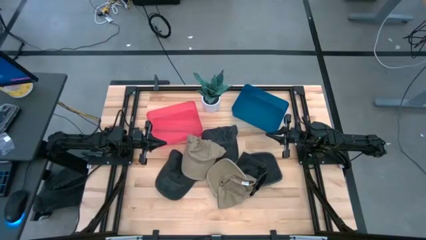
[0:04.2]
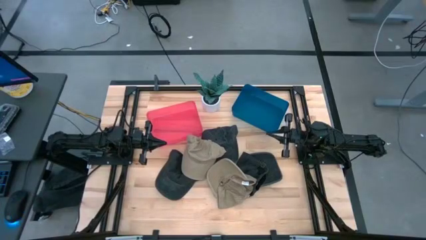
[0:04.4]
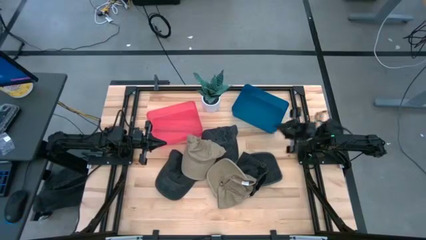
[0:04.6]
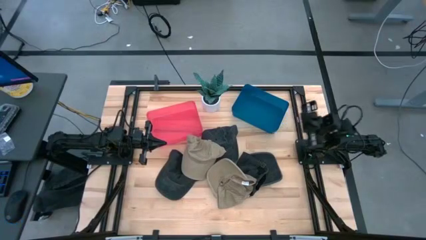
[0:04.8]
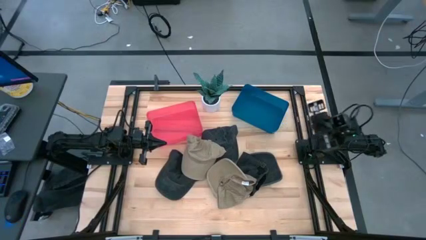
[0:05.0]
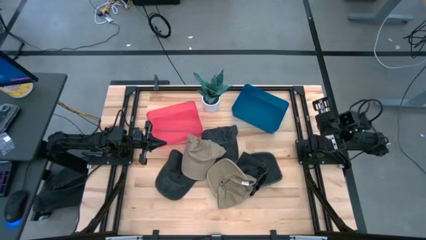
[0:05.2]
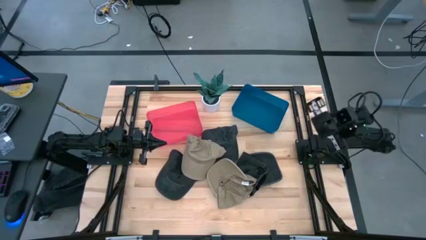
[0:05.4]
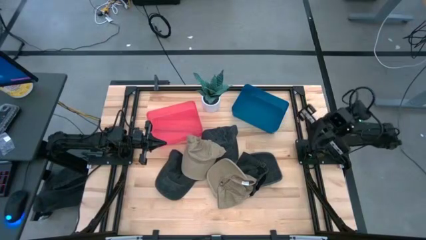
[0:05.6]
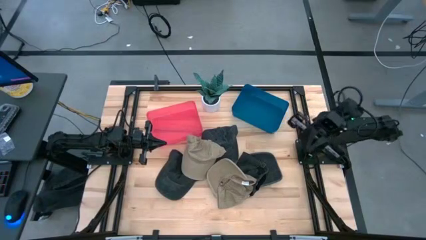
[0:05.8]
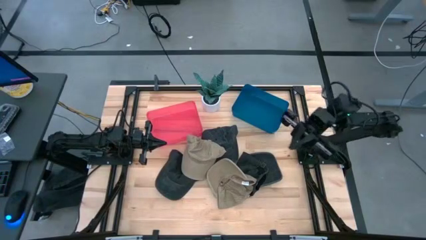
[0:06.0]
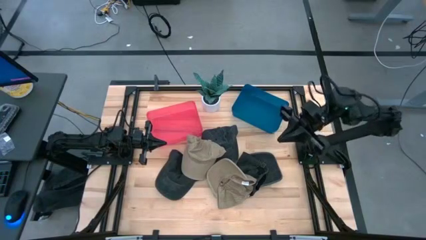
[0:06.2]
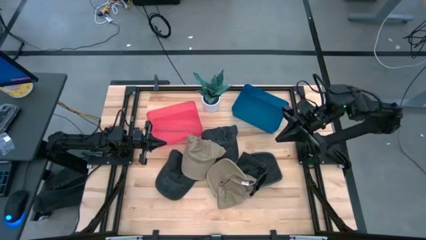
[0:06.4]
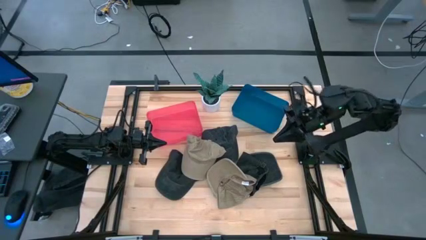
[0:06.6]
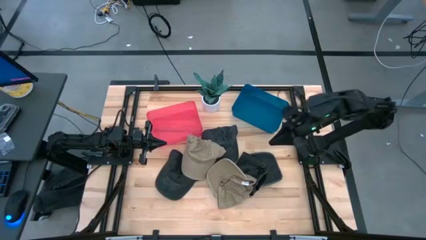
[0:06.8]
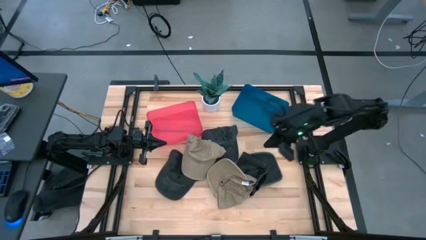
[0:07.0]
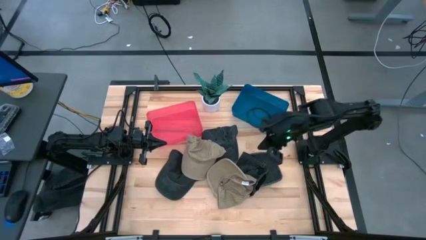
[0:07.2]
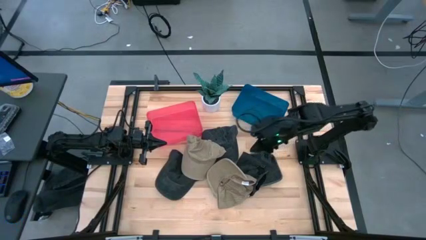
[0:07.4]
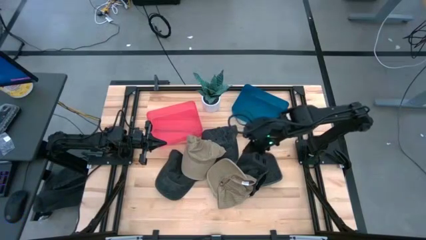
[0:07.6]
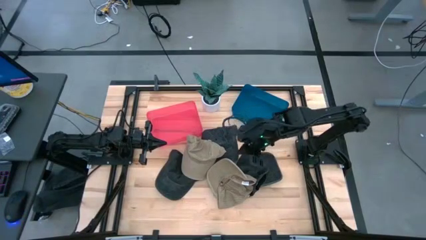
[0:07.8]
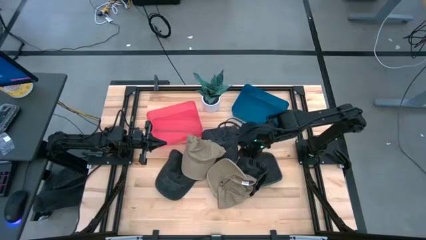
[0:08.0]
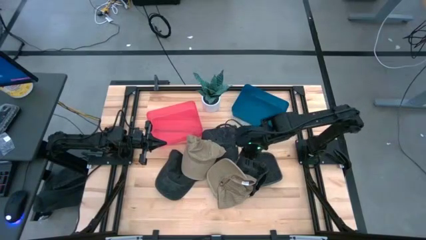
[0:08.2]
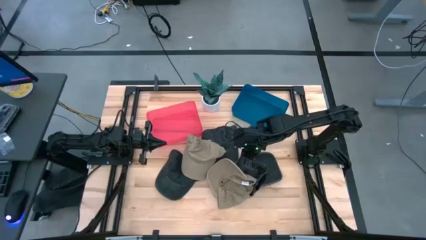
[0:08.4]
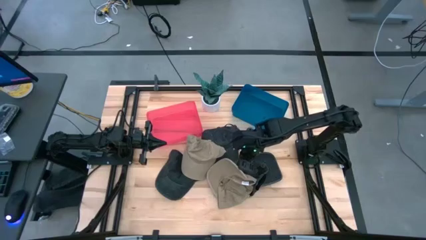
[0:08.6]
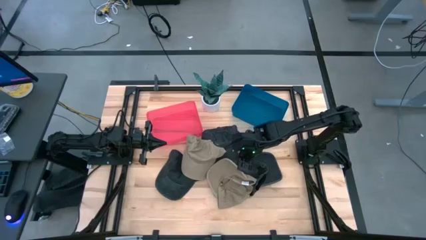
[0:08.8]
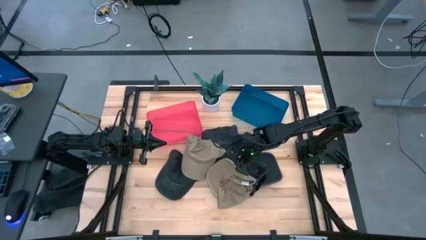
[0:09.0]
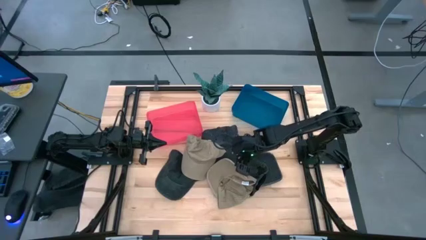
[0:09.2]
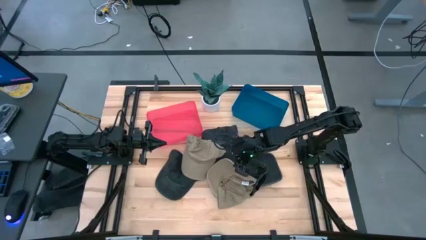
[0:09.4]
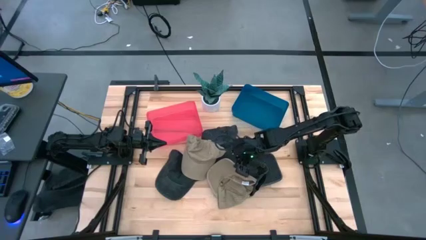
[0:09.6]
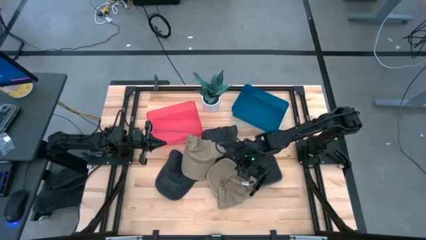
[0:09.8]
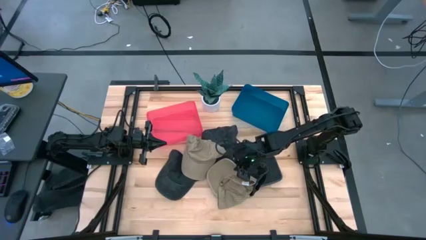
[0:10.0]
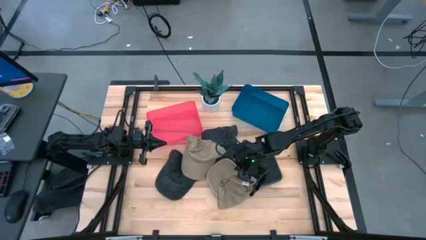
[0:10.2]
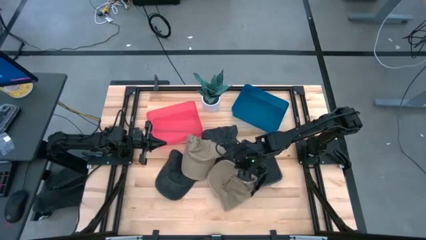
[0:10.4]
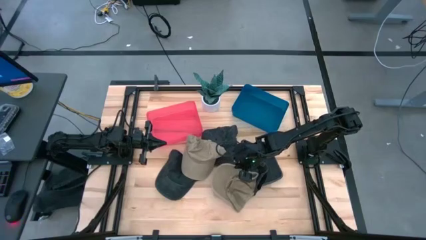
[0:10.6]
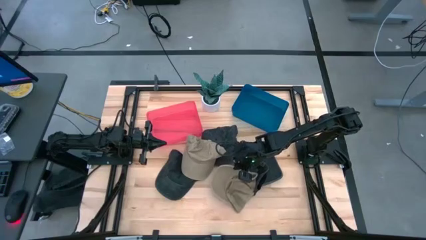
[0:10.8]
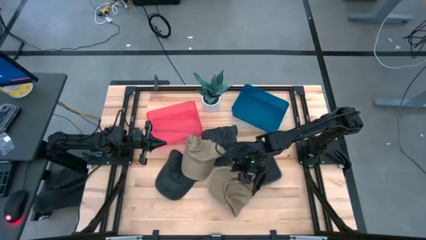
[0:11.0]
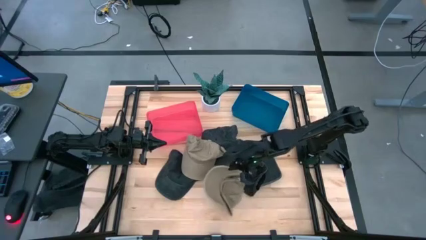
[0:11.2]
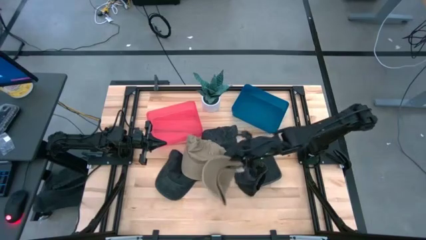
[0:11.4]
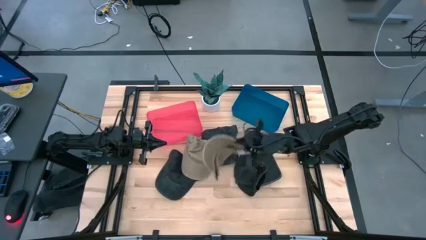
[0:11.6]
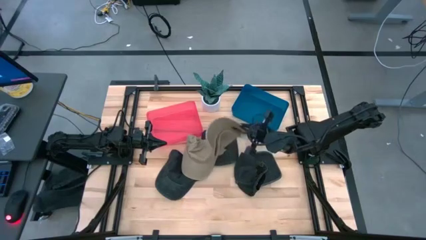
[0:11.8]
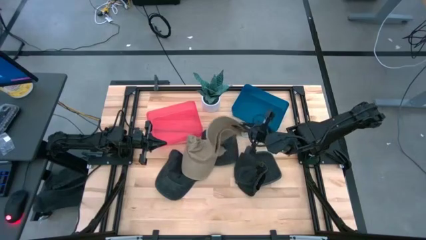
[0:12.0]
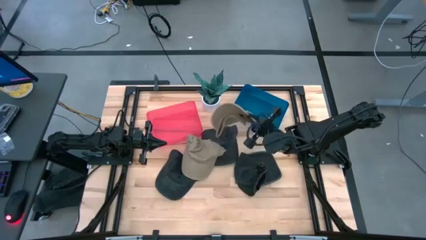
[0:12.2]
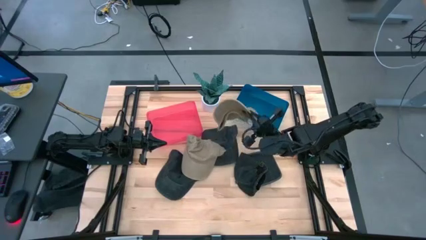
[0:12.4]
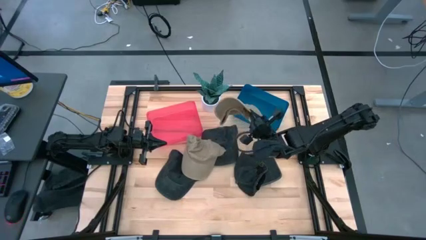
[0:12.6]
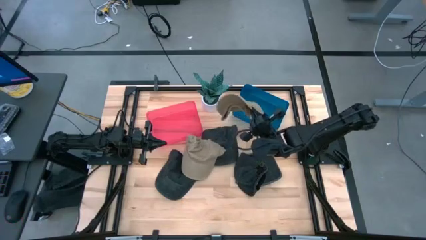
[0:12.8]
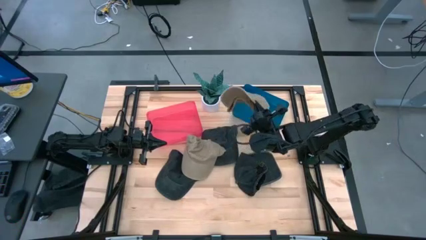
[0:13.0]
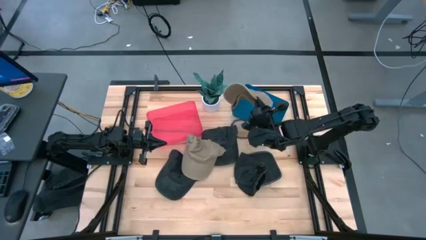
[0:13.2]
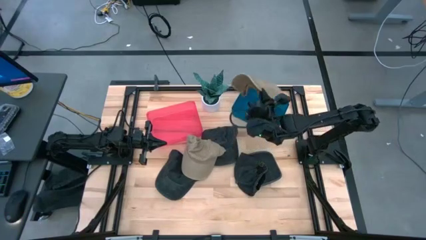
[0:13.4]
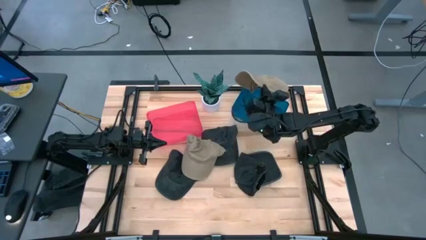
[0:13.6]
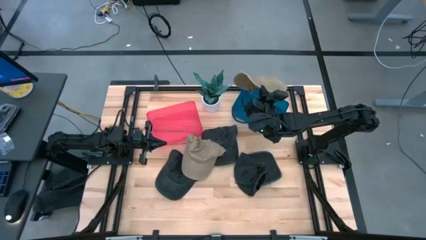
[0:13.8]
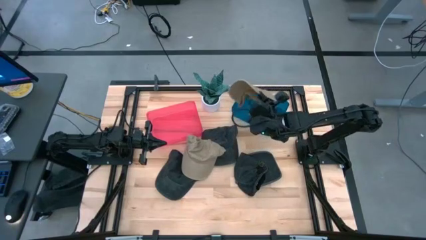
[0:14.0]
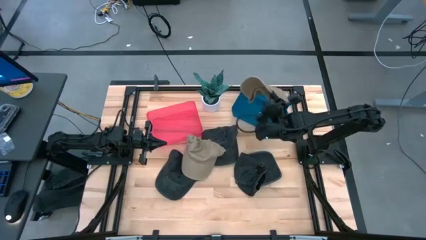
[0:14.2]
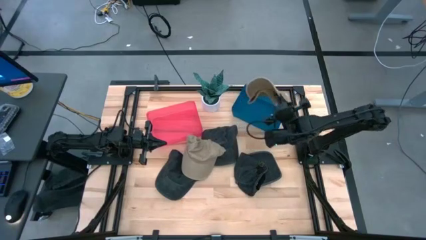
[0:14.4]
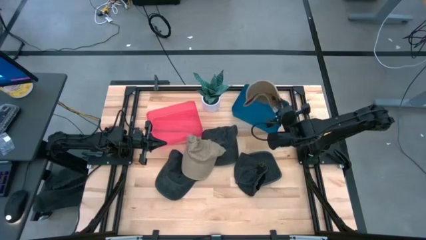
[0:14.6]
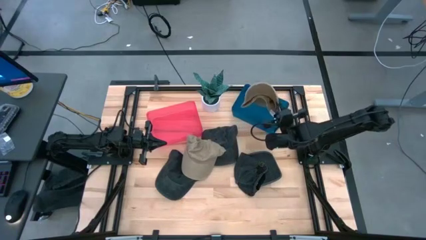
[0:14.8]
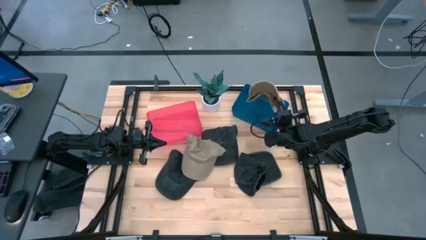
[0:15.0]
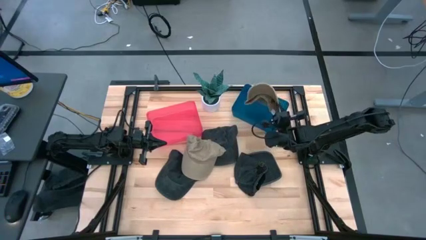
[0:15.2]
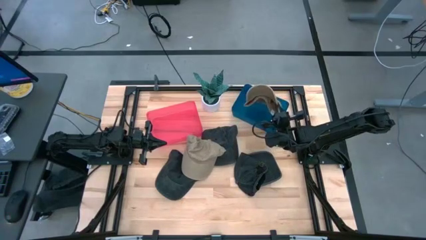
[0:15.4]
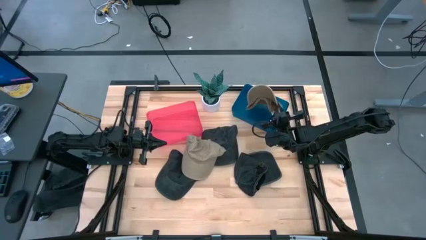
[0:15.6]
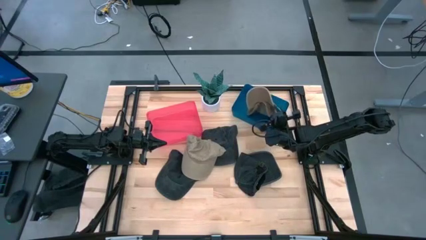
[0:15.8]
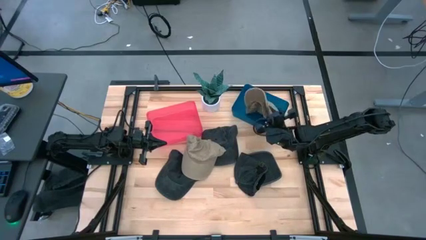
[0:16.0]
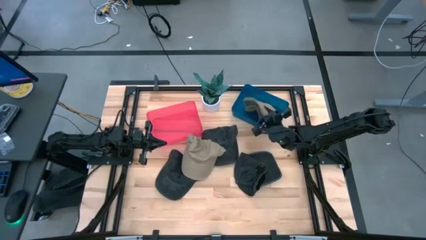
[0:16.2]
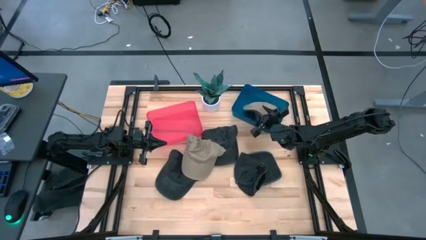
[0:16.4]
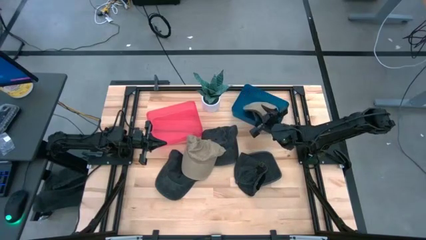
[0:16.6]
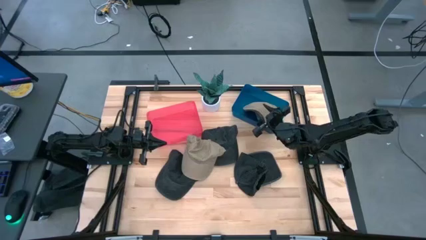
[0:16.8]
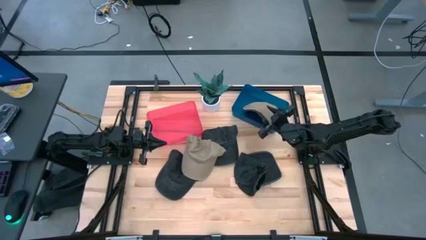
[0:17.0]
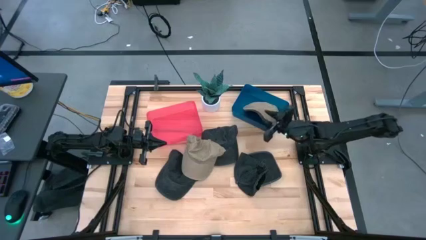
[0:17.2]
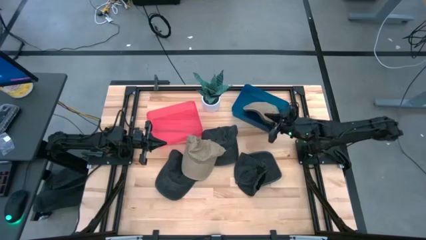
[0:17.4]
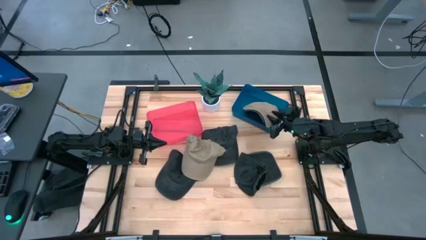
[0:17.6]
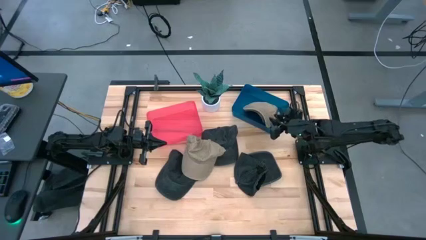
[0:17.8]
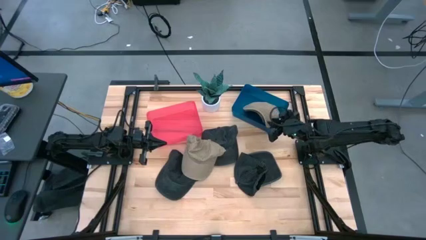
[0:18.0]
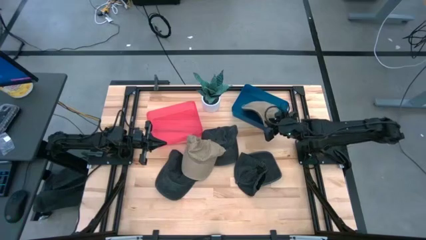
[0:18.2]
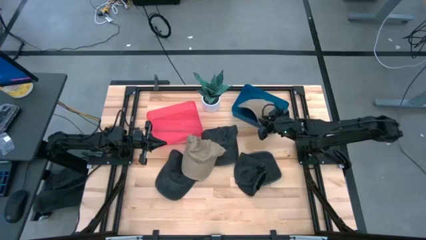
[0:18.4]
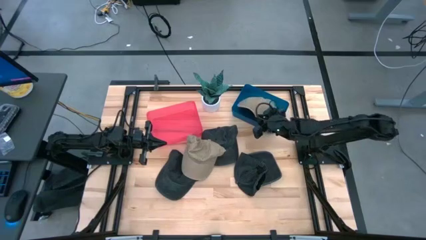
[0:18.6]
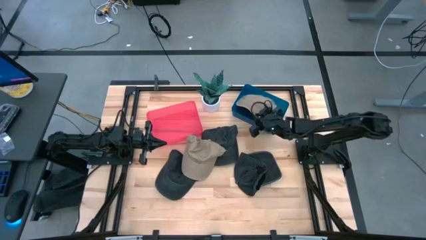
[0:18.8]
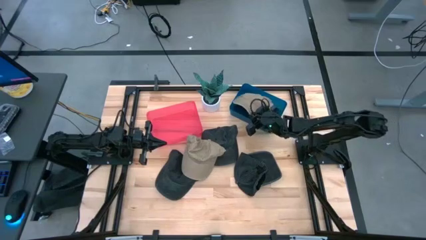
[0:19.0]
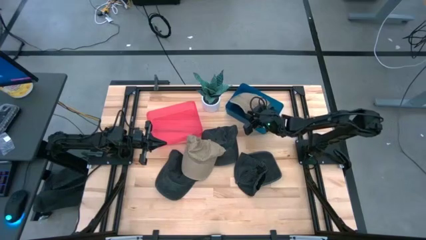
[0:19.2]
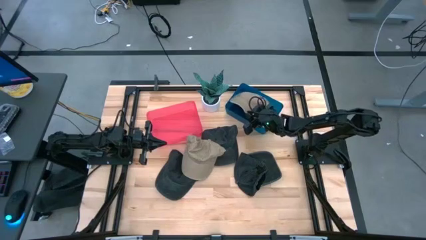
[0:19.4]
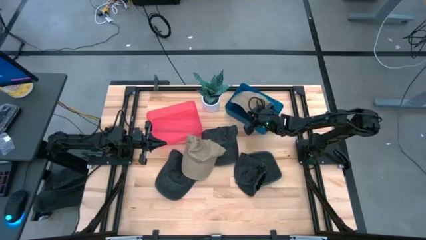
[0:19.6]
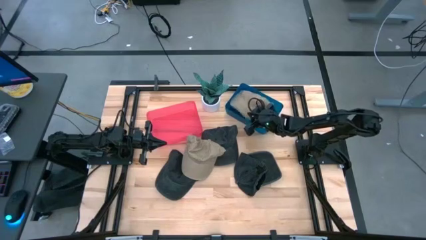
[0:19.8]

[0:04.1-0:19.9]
Task: Pick & Place hat
Put the right brown cap into the blue bin
